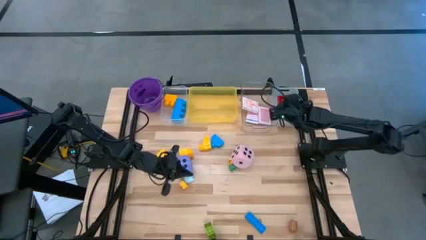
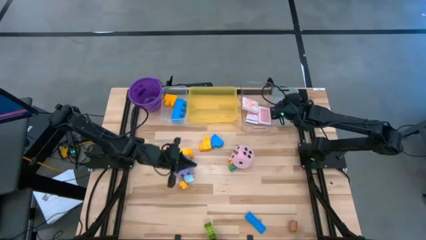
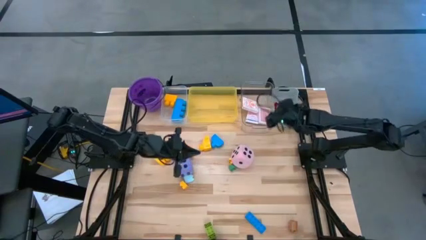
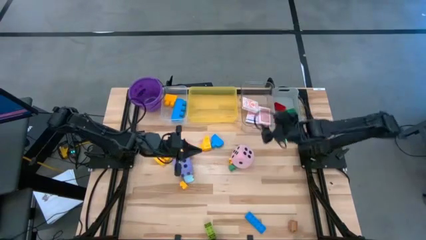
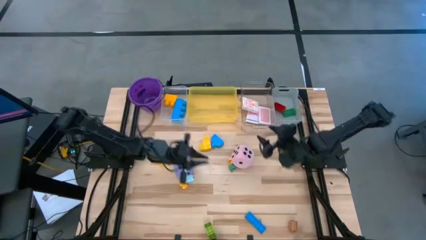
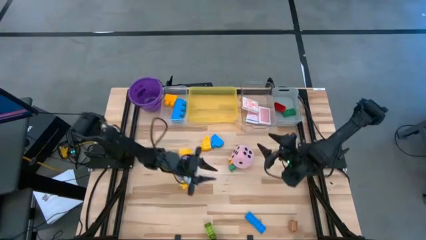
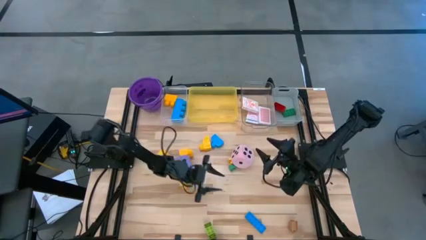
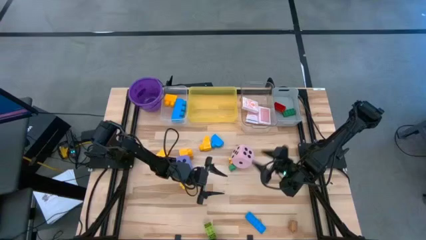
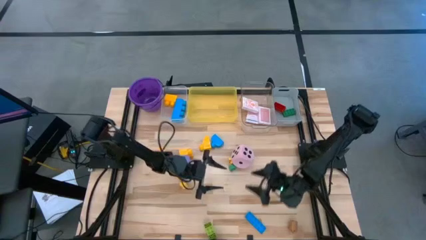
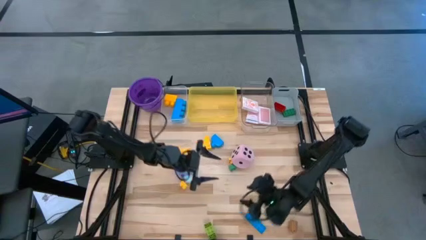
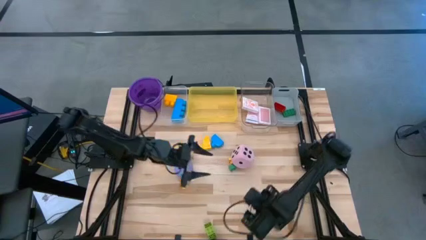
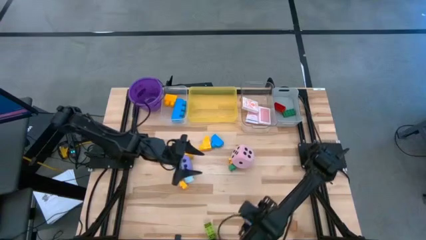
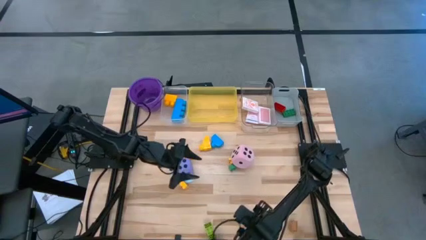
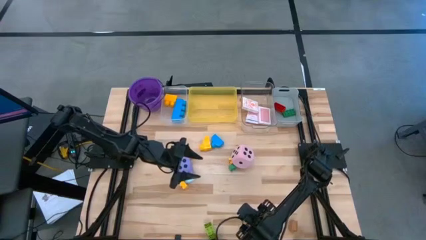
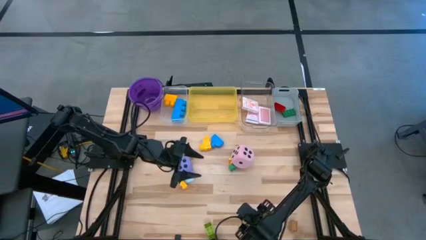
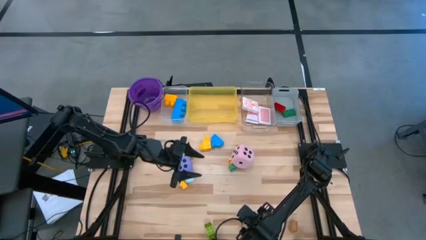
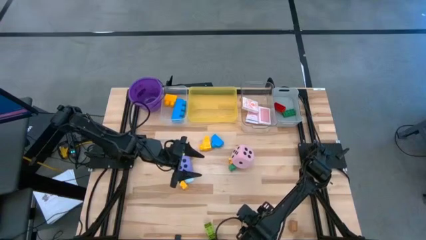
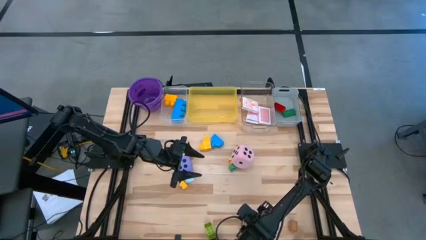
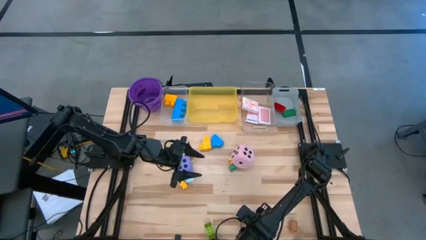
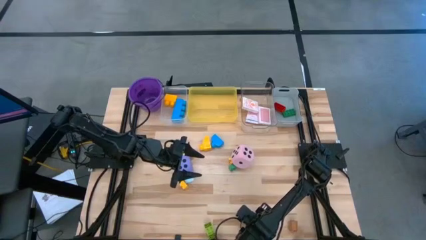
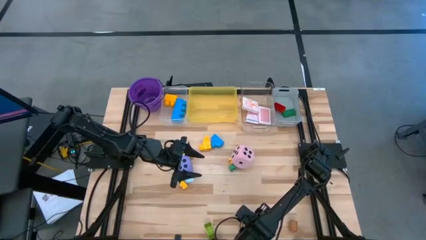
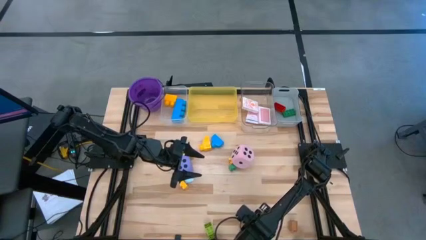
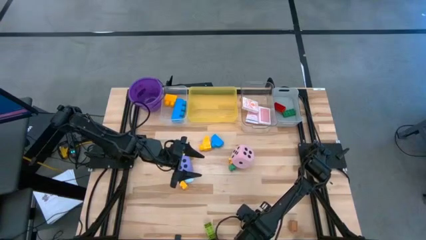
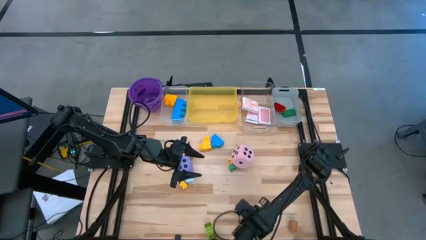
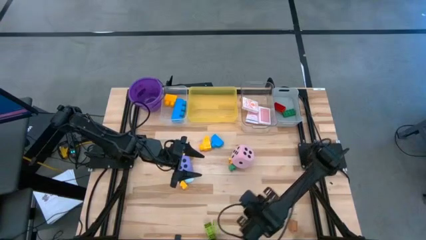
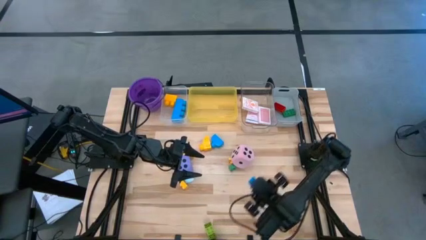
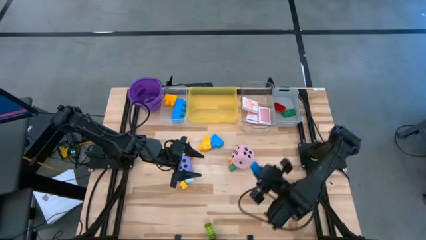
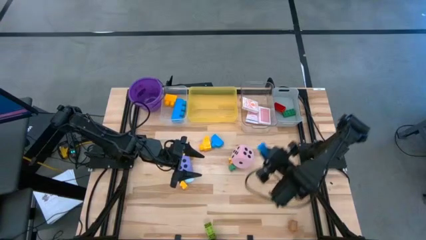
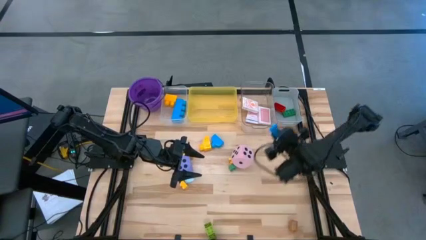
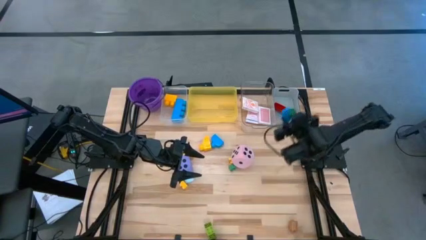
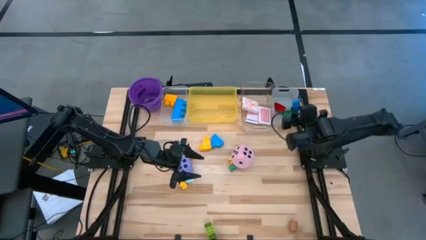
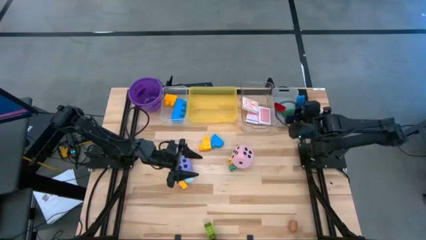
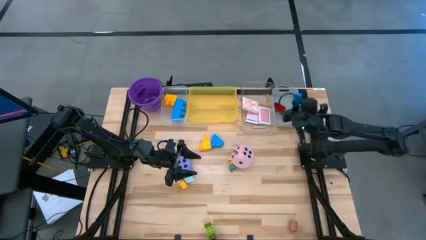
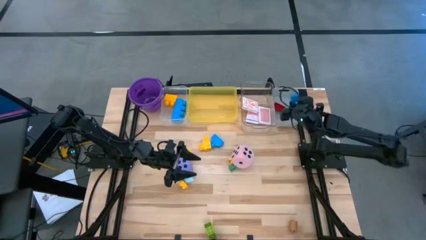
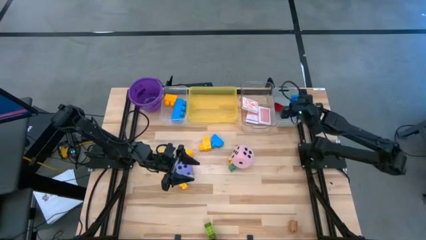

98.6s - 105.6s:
Task: Pick & Place Toys
Put the small blue game piece into the gray bin

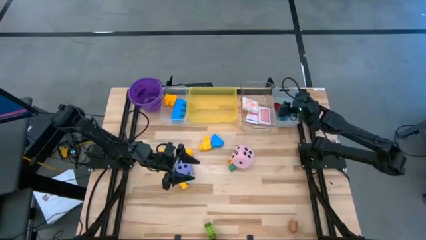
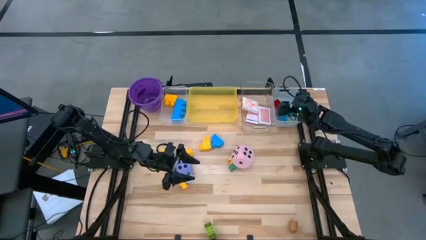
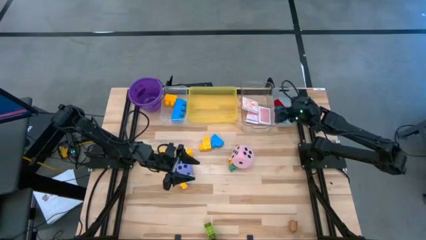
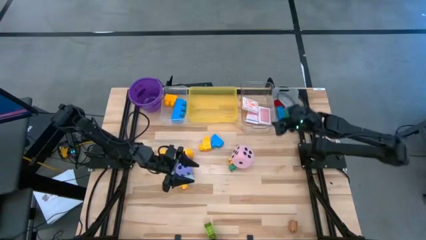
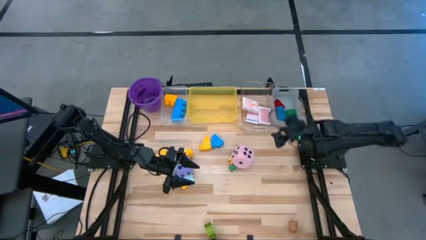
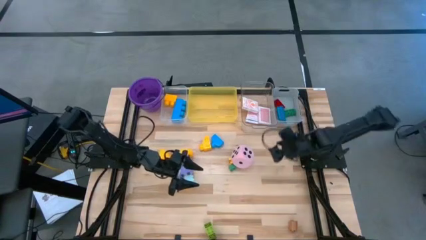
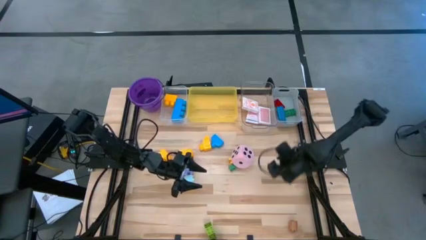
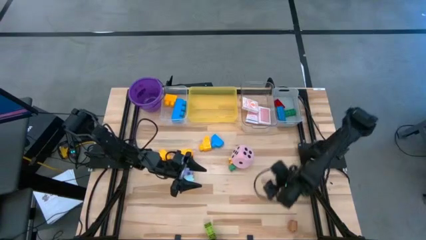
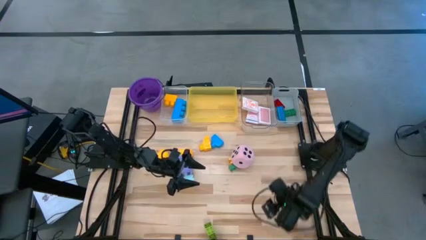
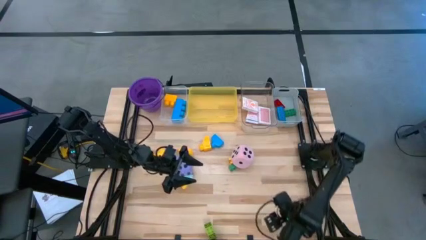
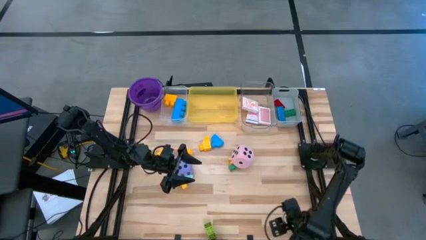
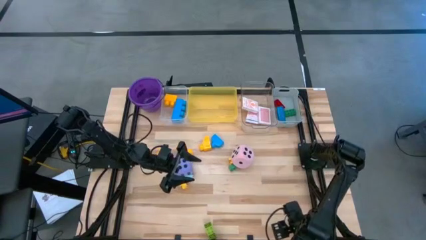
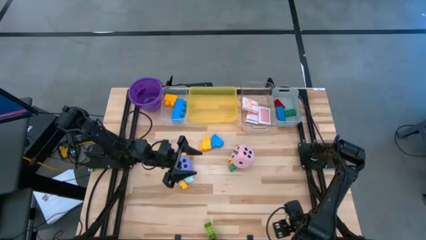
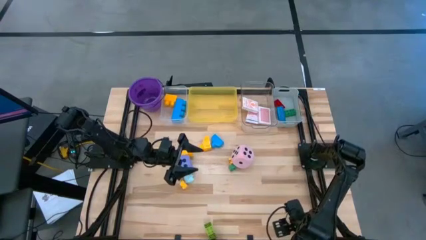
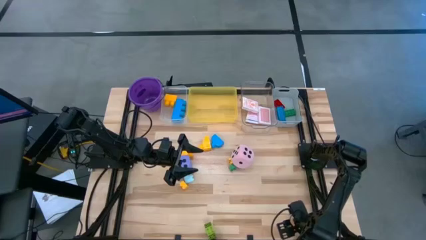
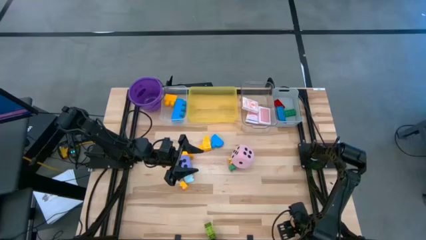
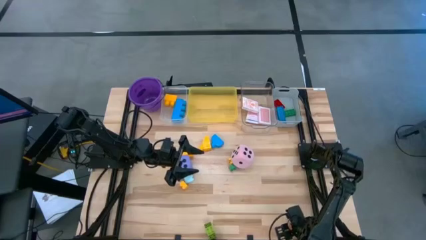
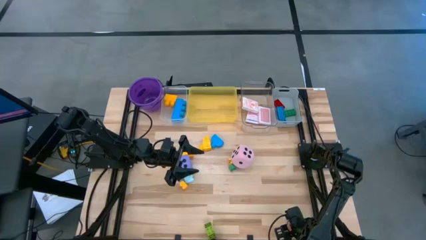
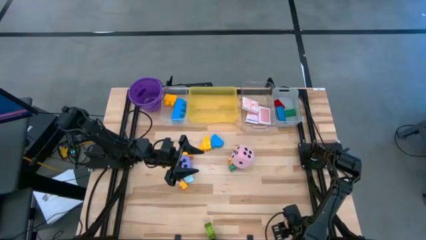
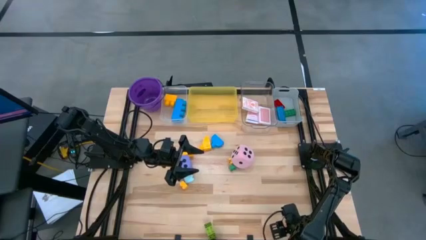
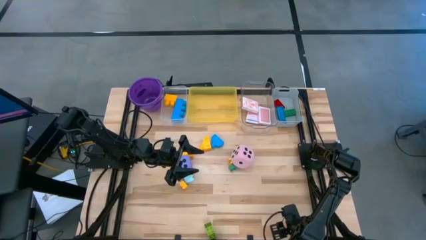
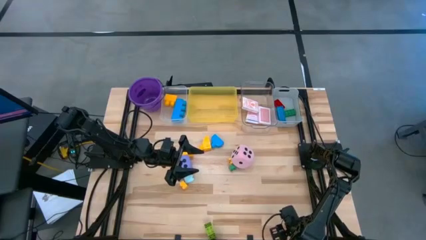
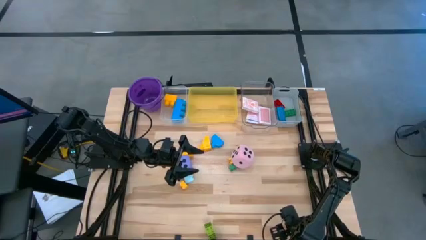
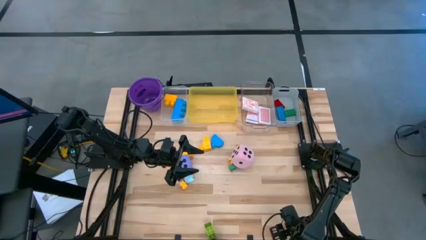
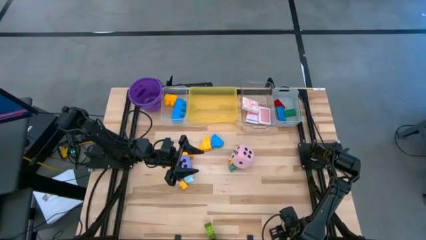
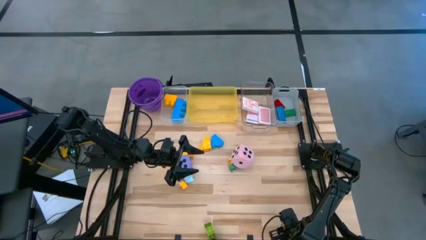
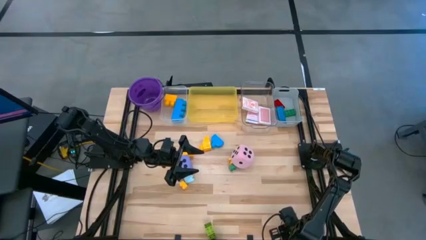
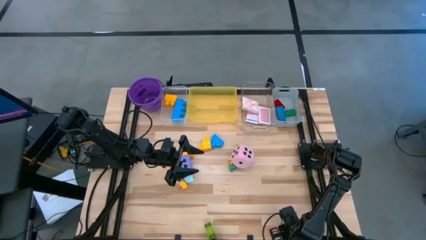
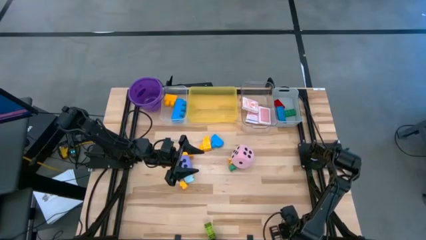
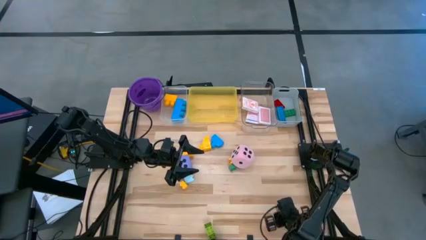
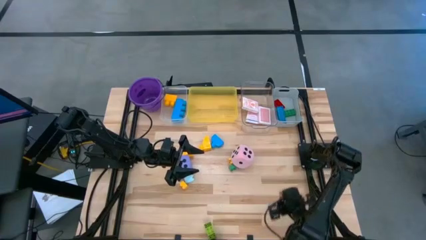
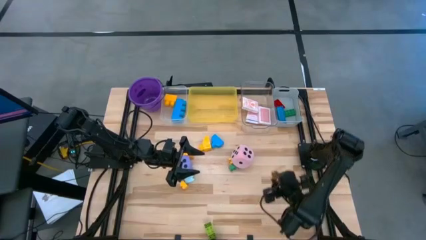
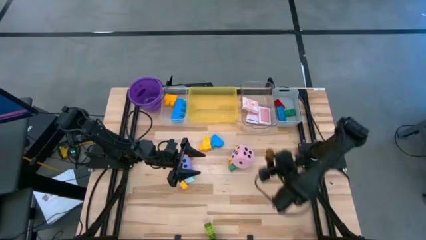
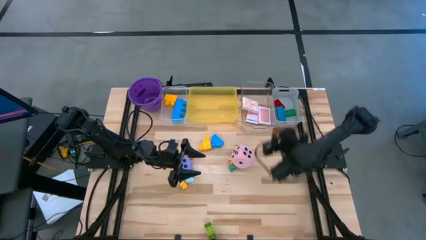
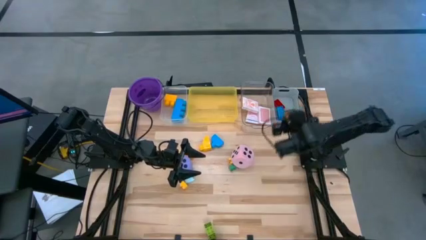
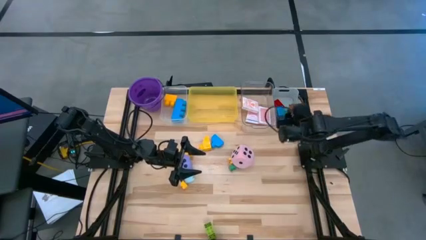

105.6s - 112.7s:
Put the small brown game piece into the gray bin

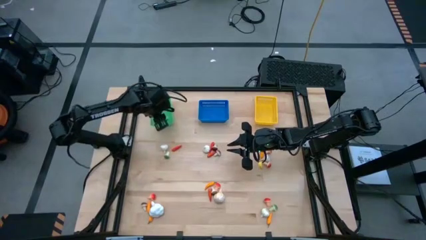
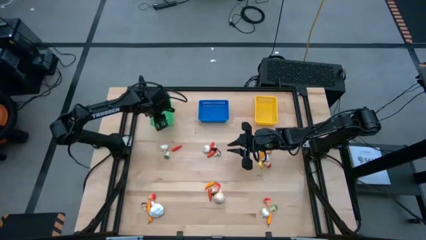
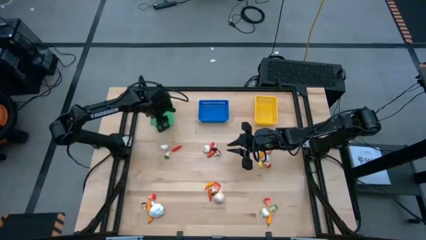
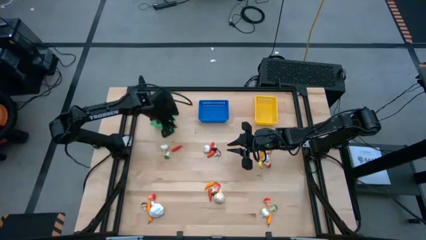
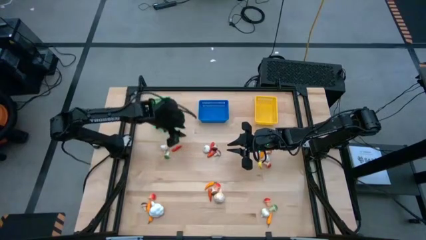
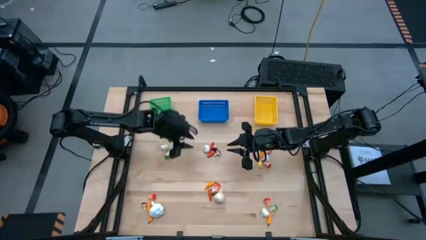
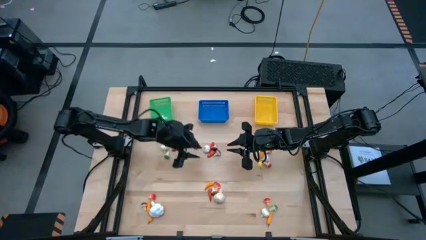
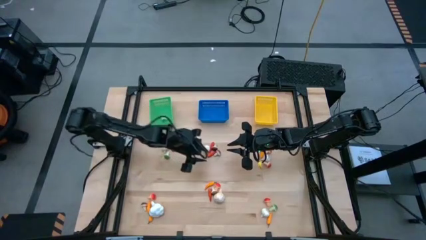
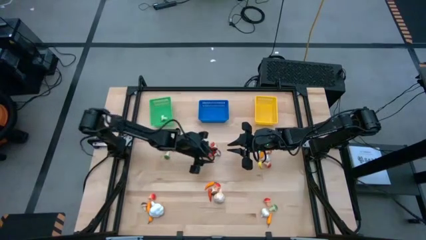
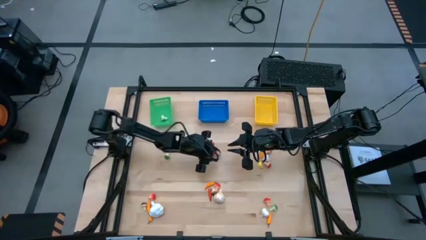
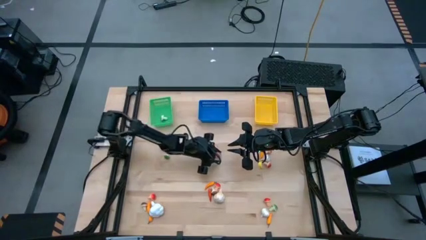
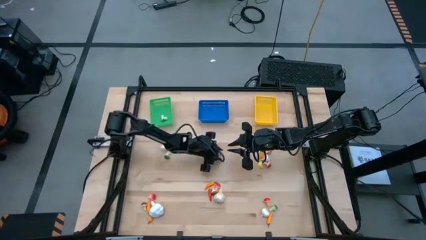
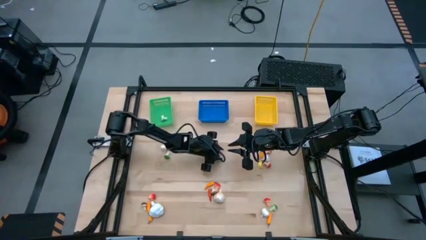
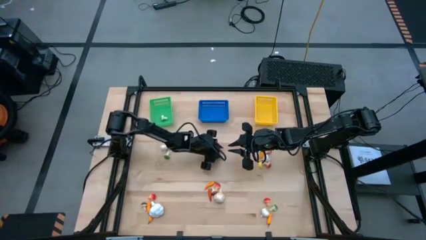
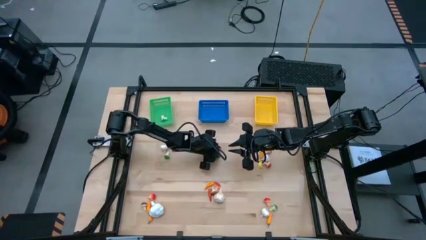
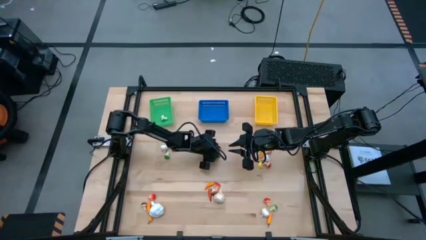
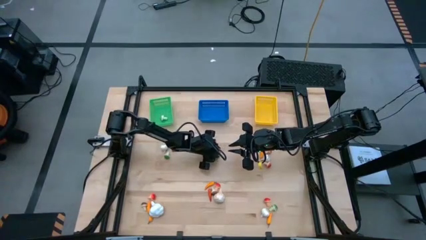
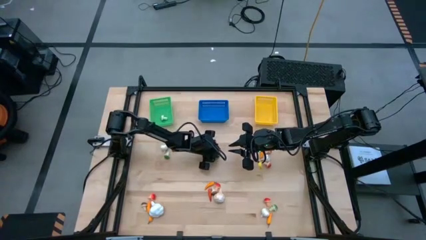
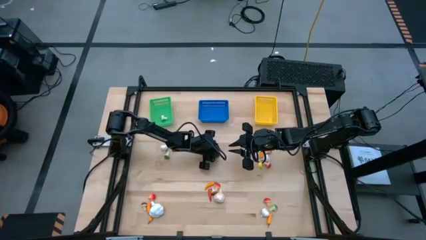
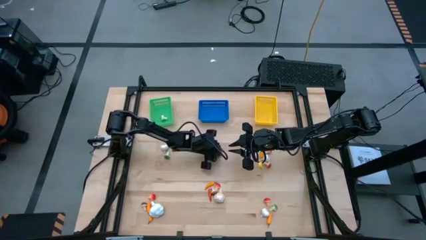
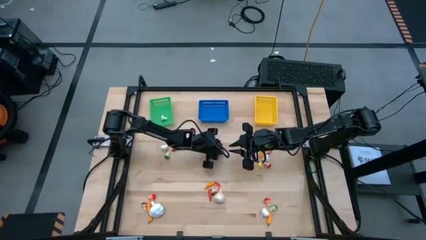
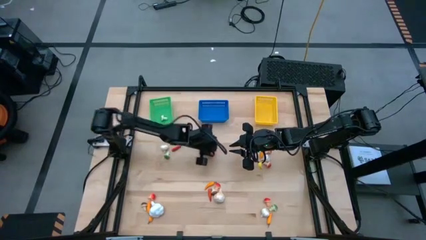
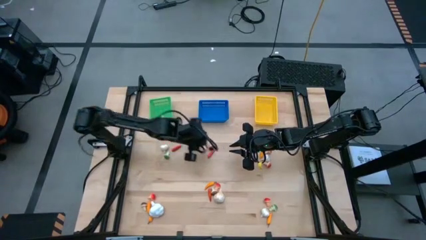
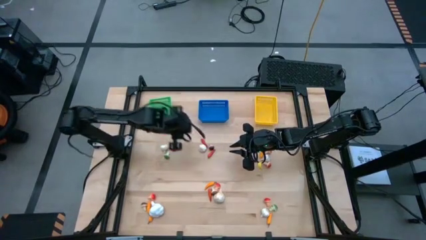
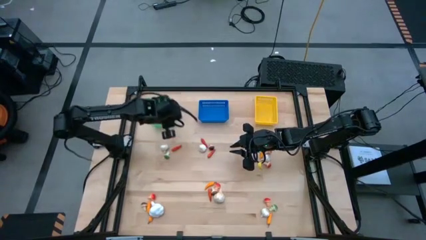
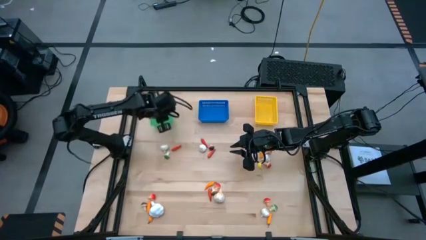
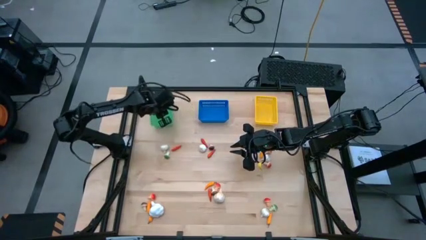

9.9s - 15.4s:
Task: Sort produce into baskets
Put the brown mushroom into the green bin
